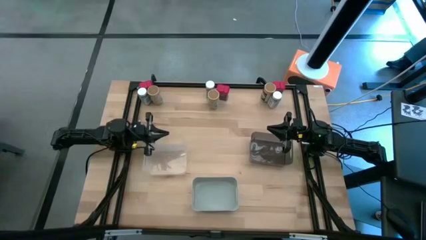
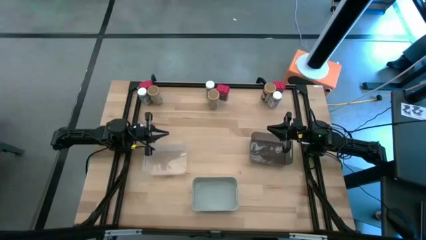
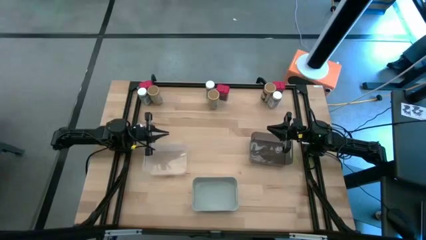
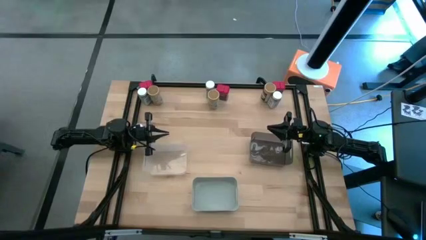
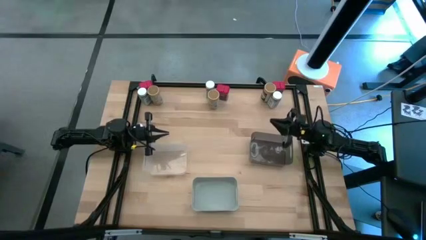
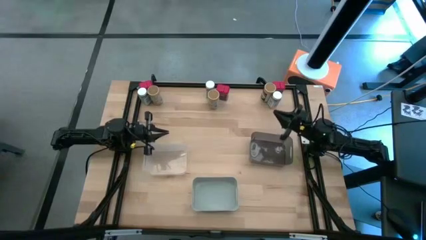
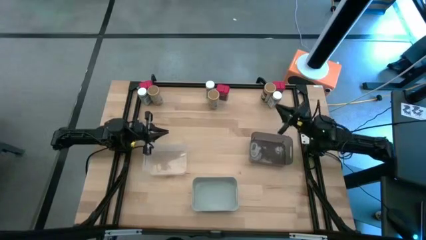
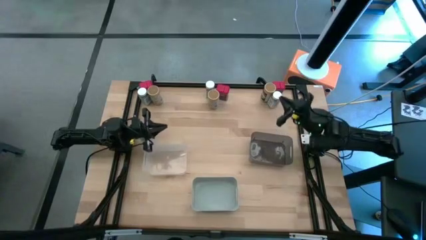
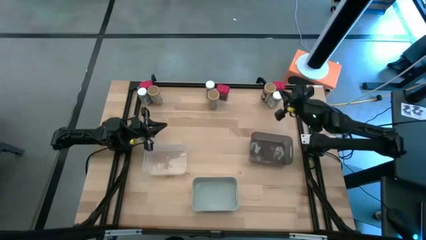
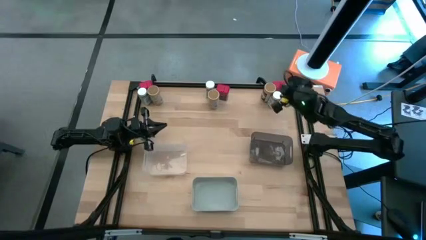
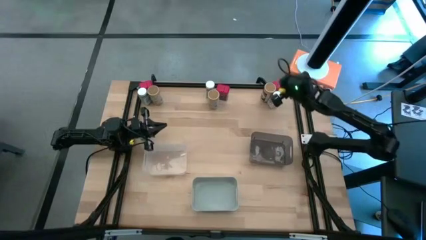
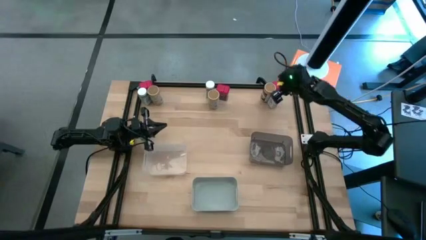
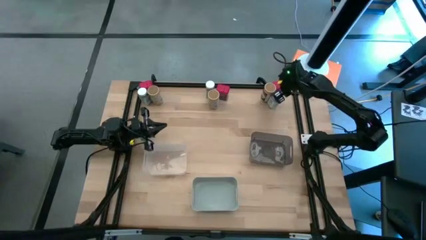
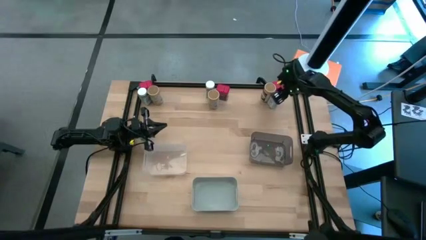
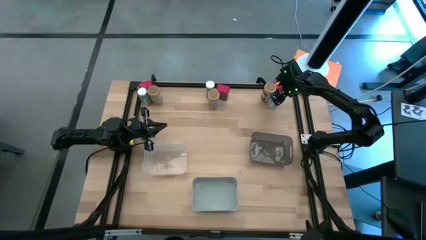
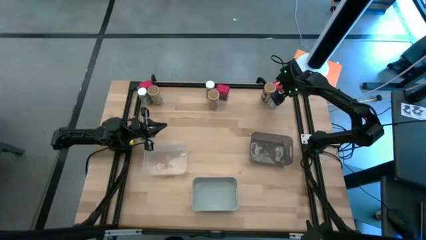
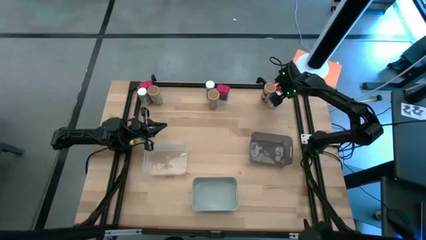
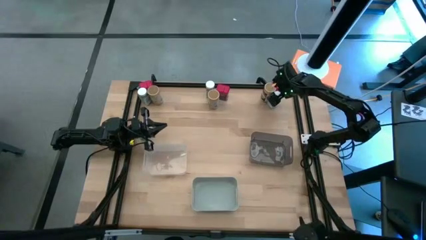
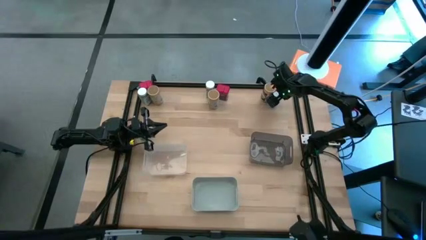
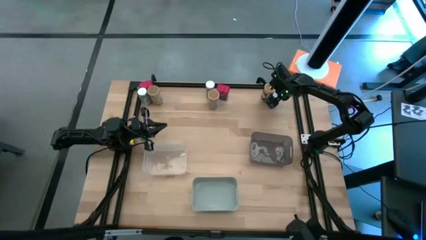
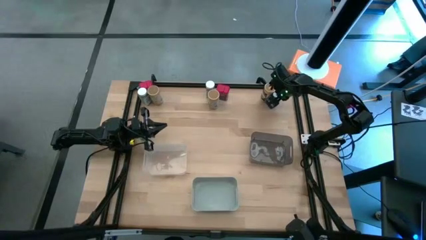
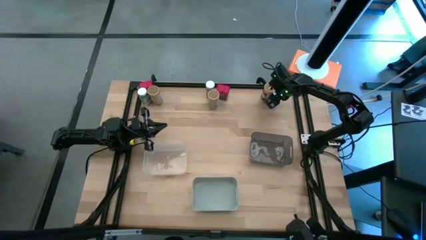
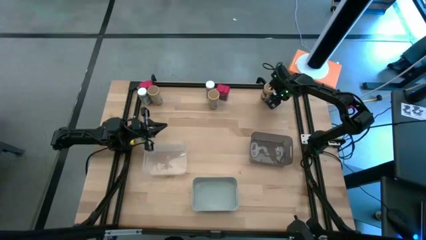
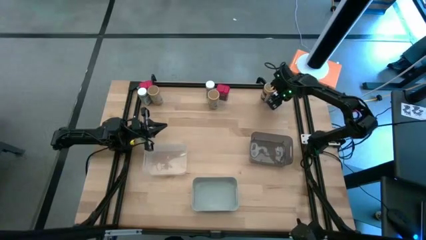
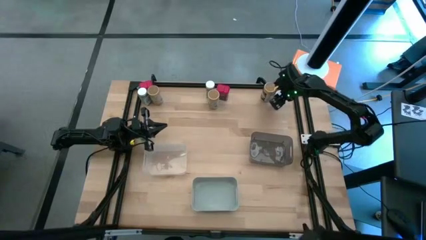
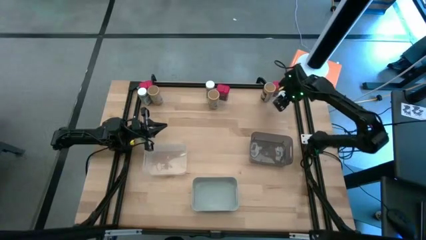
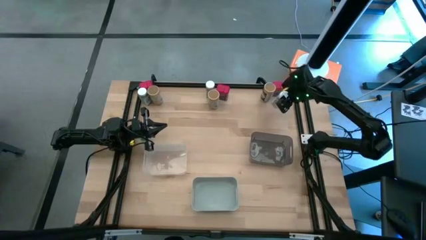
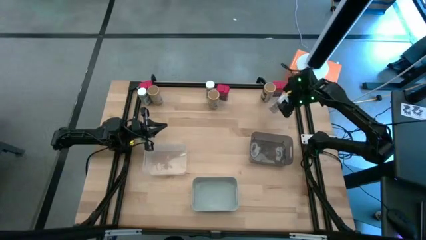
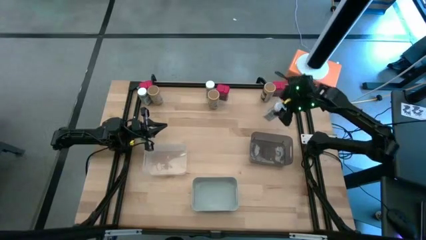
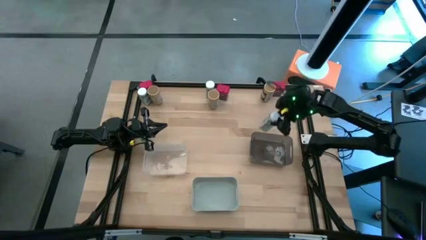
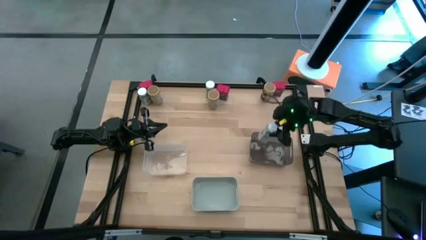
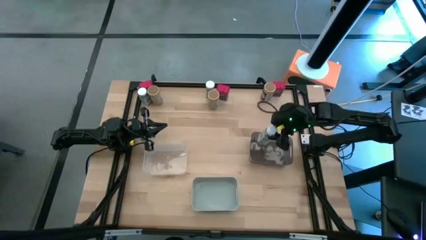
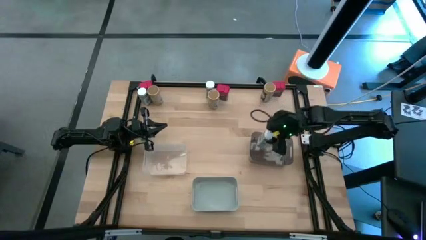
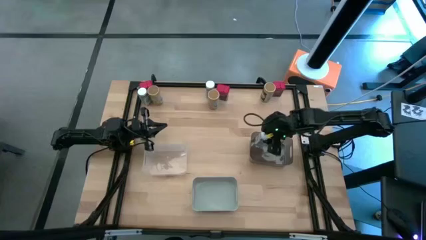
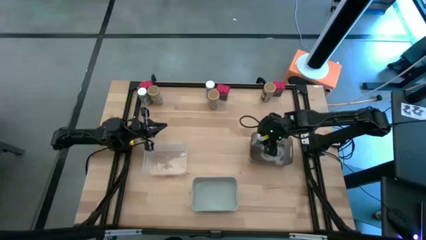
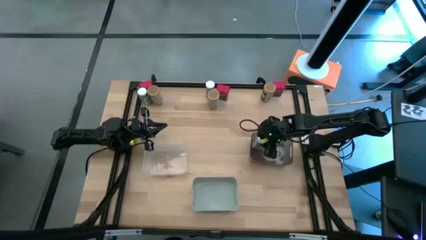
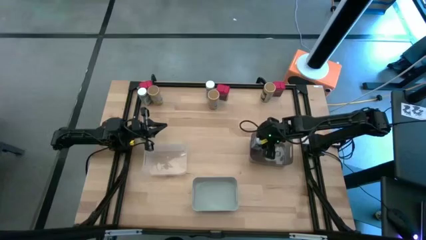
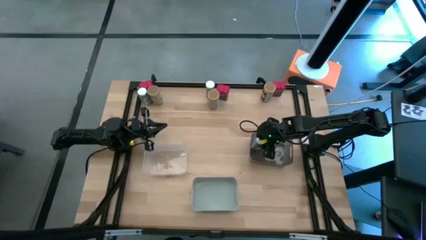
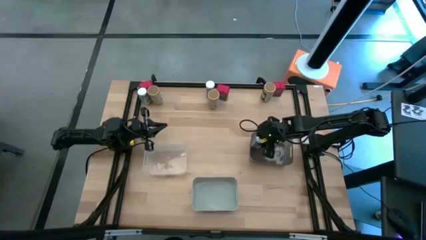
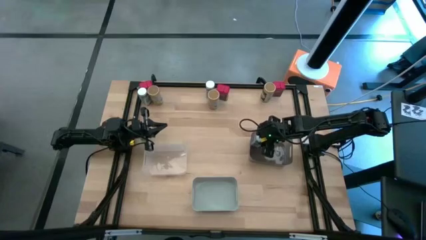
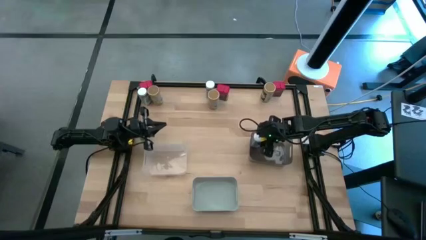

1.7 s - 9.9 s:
Task: Sort spices by type
Put the white seasoning bottle into the black bin

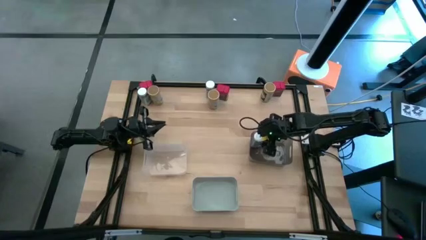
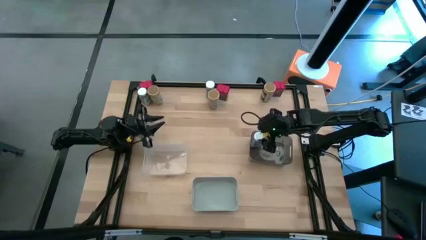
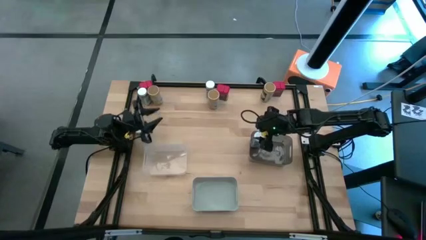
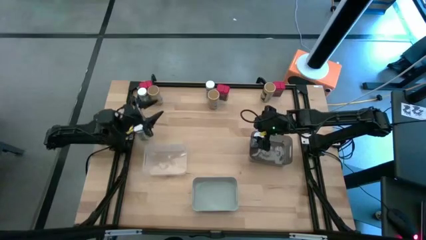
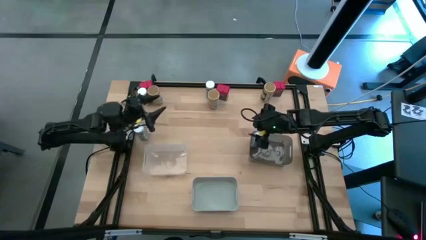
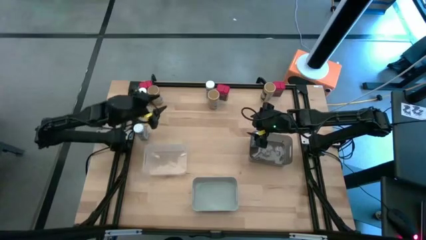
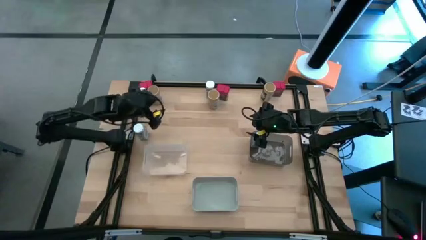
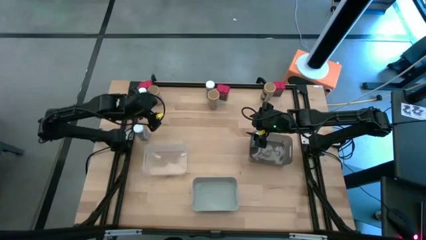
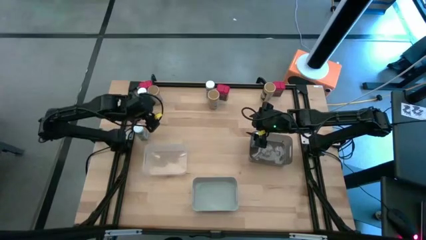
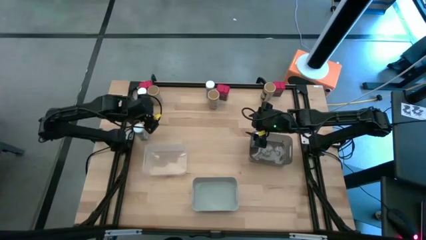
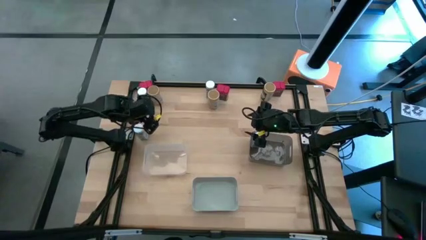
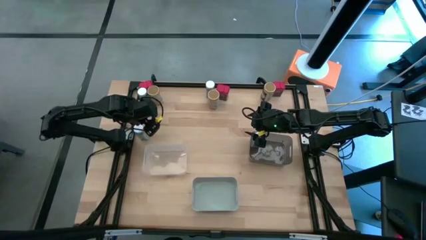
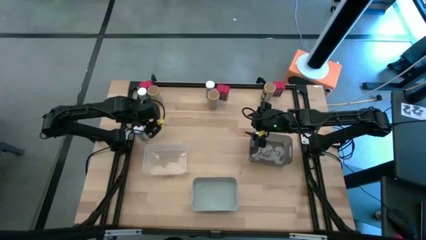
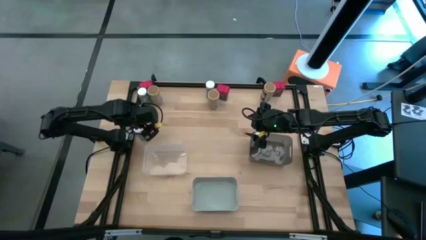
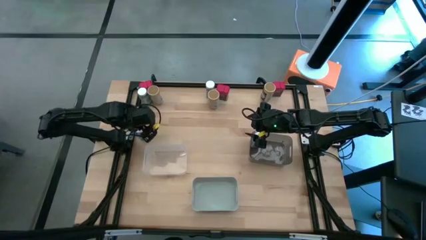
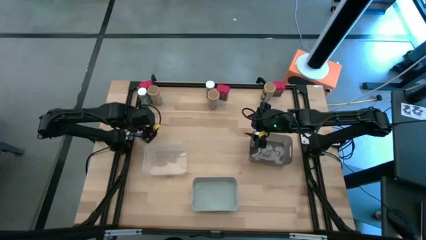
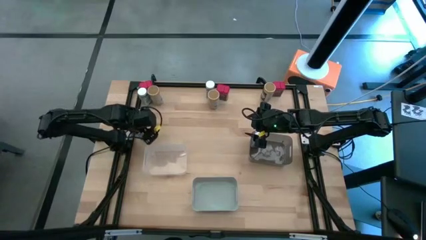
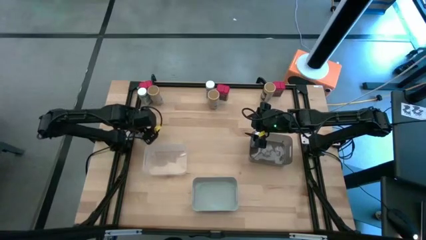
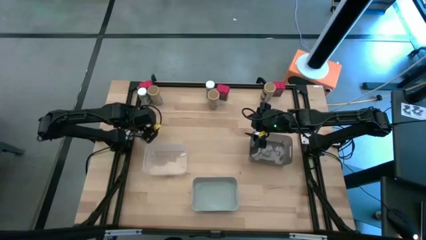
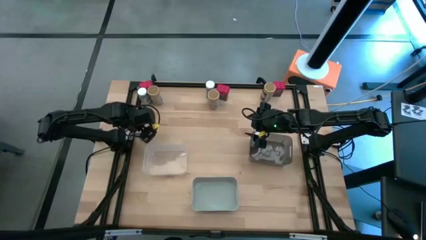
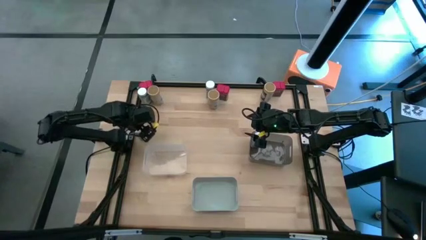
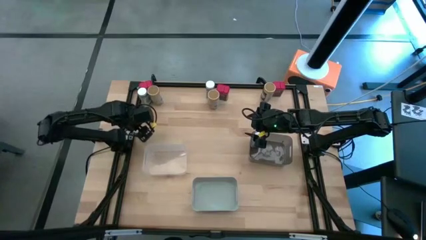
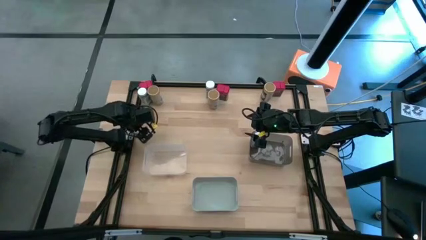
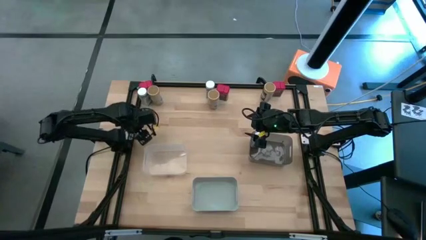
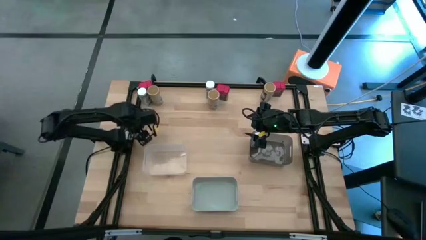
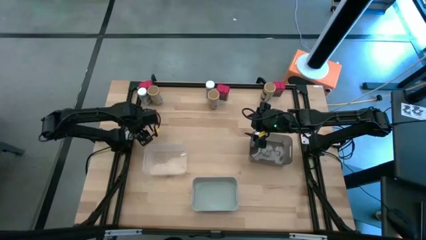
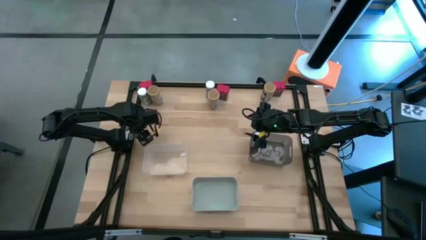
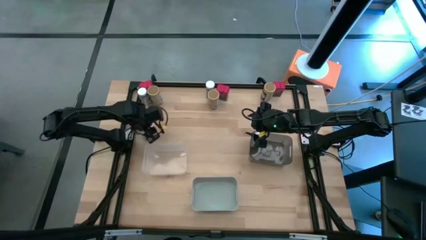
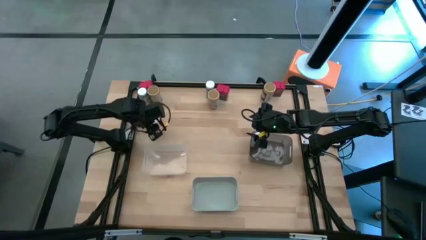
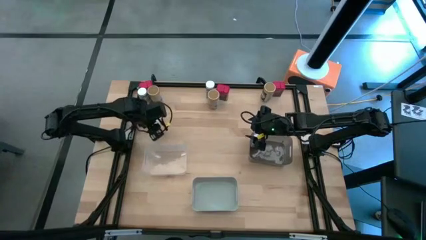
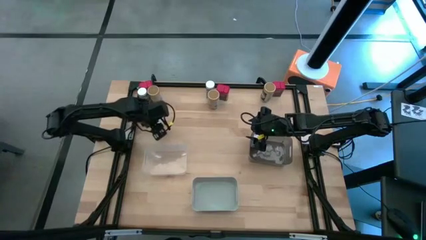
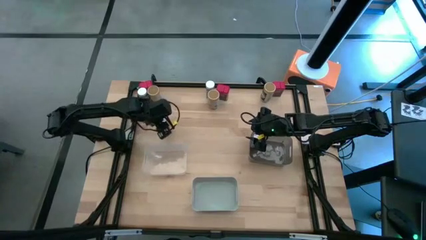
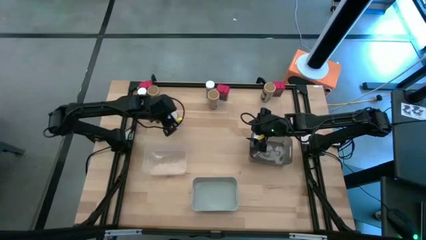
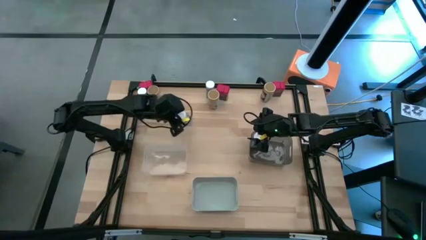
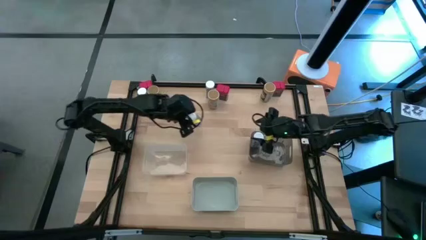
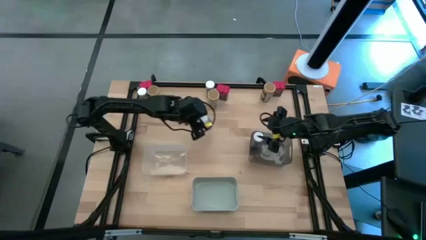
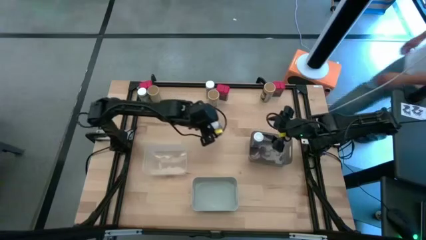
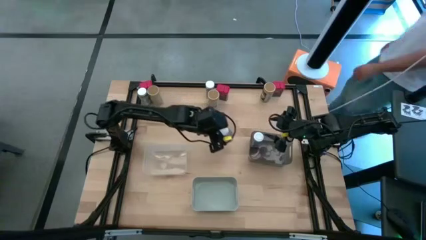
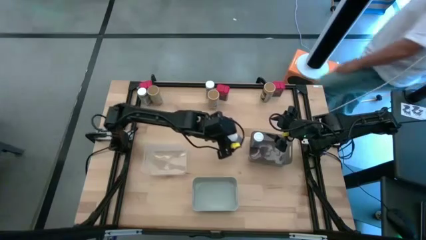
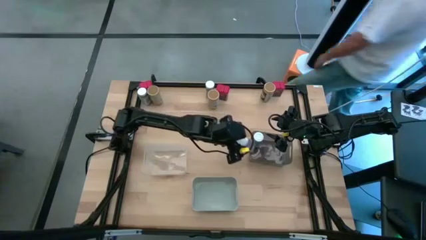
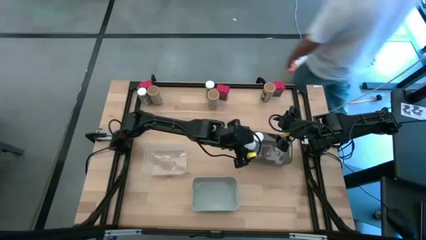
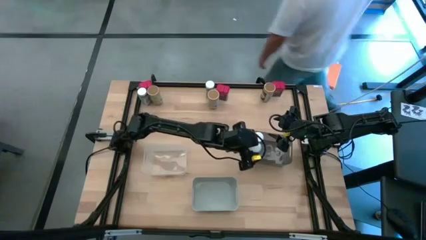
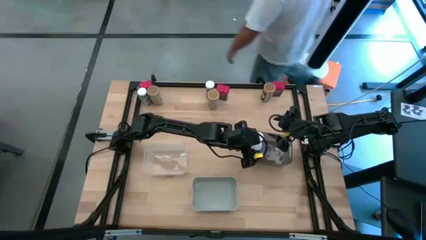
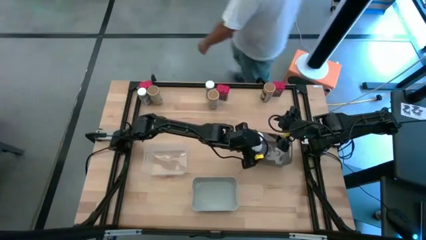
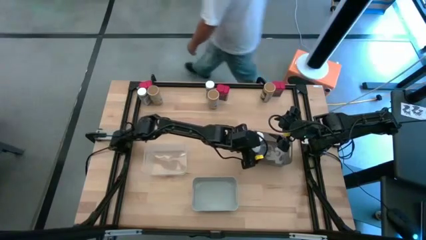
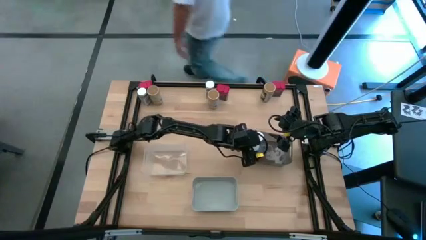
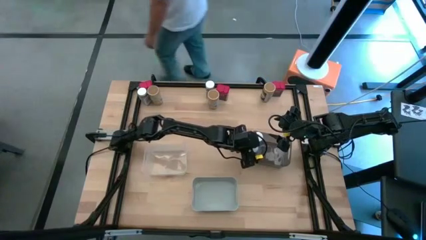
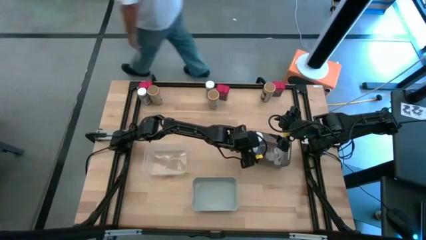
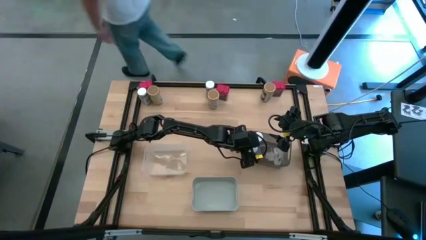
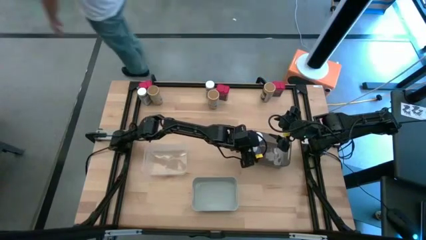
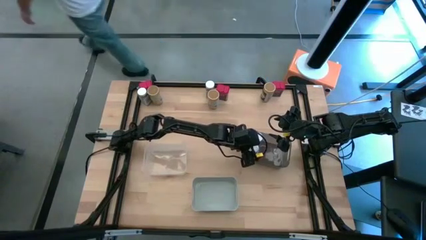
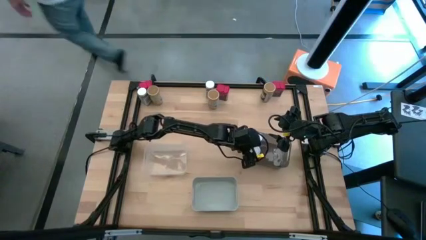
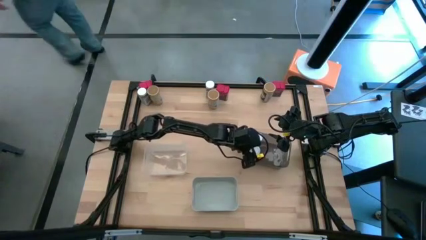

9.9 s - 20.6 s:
Put the white seasoning bottle into the black bin
